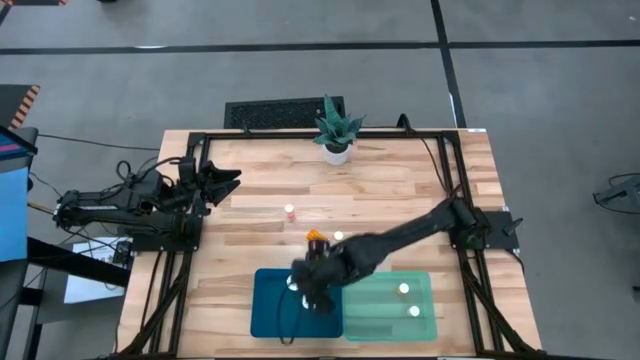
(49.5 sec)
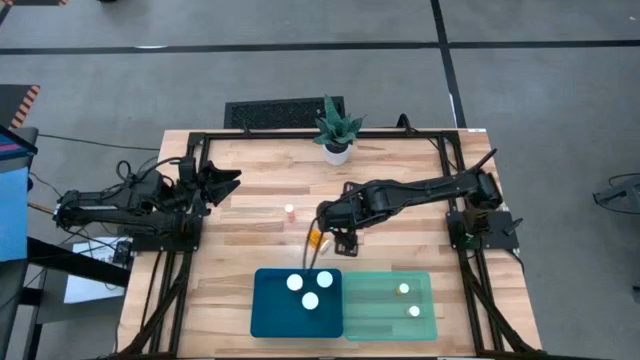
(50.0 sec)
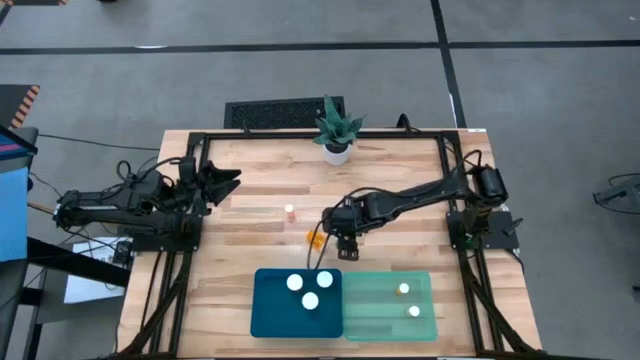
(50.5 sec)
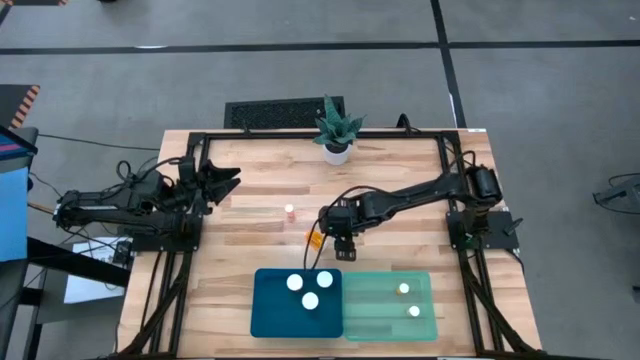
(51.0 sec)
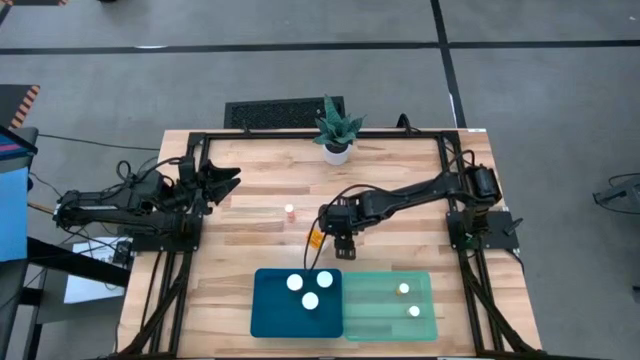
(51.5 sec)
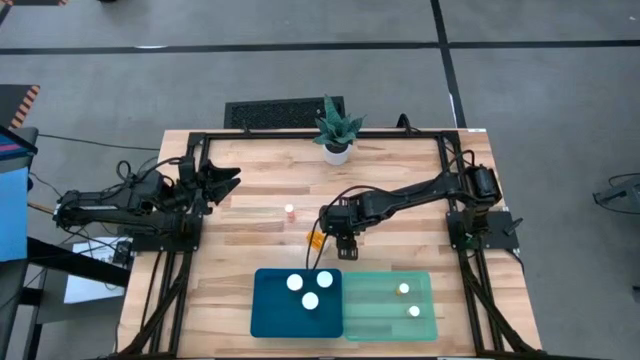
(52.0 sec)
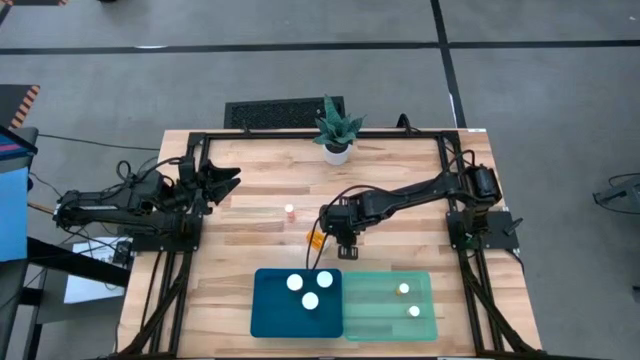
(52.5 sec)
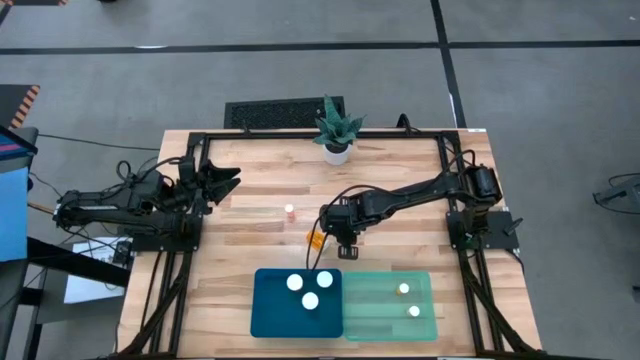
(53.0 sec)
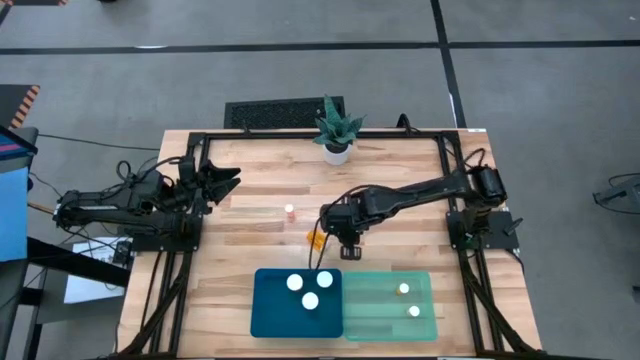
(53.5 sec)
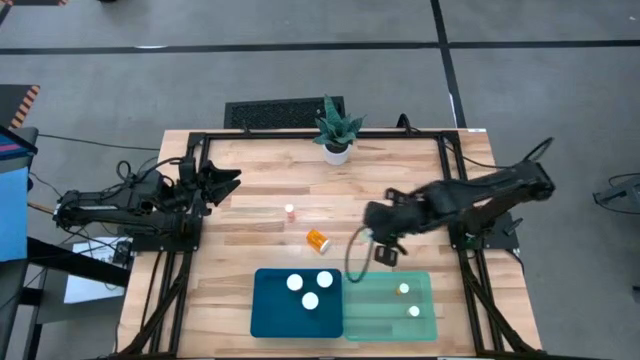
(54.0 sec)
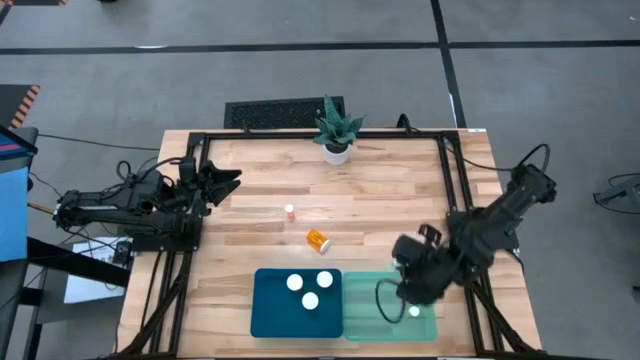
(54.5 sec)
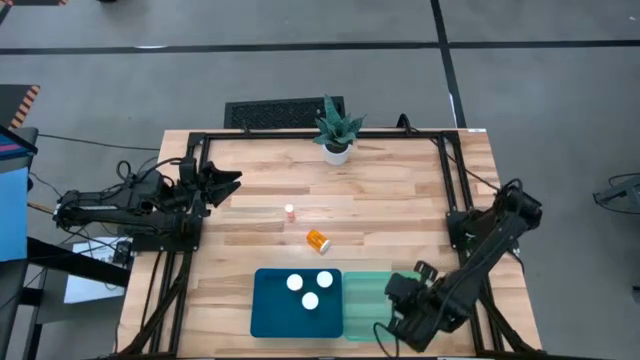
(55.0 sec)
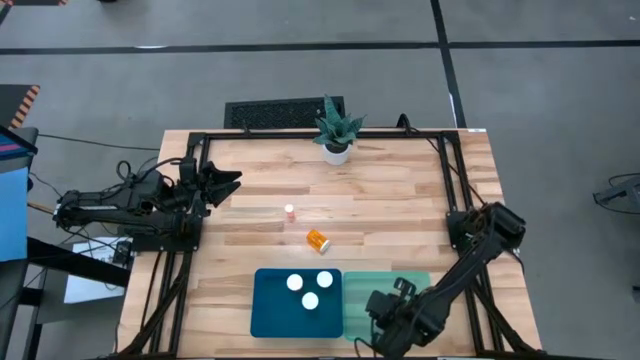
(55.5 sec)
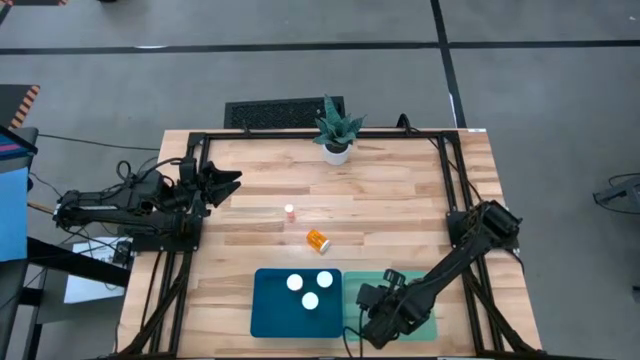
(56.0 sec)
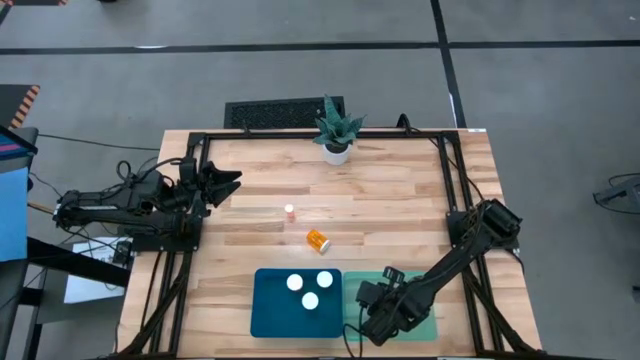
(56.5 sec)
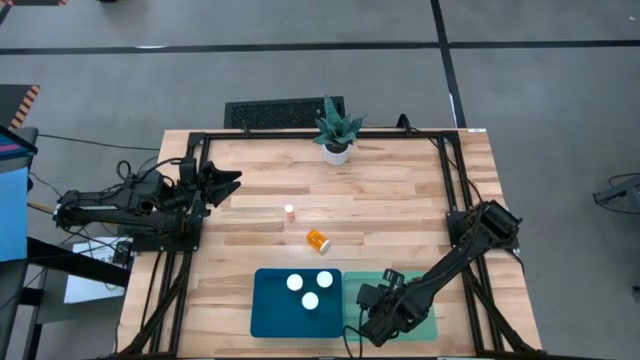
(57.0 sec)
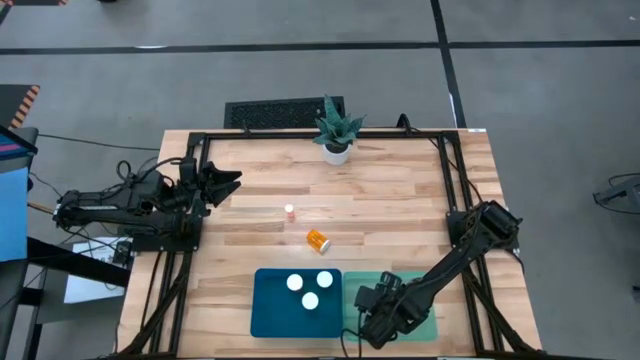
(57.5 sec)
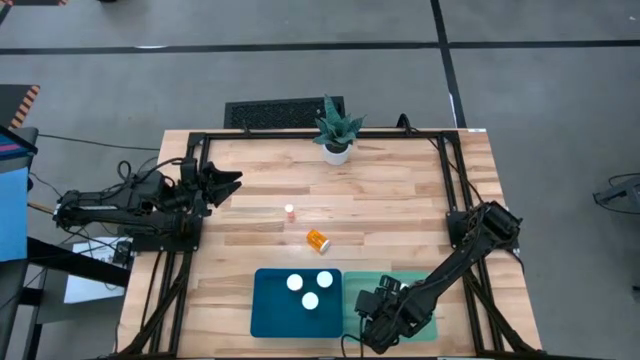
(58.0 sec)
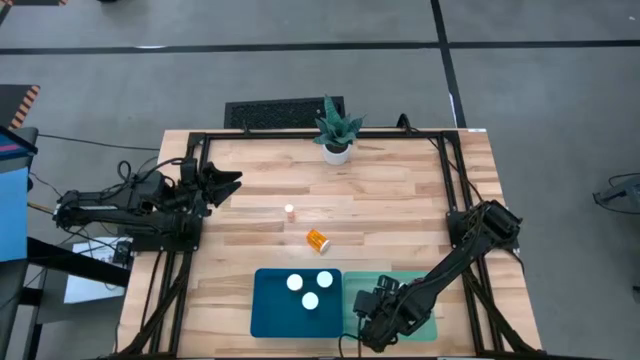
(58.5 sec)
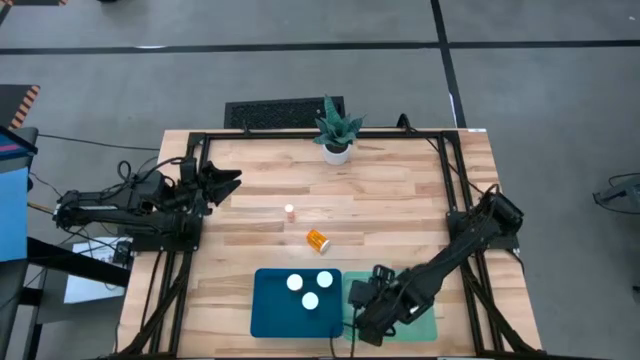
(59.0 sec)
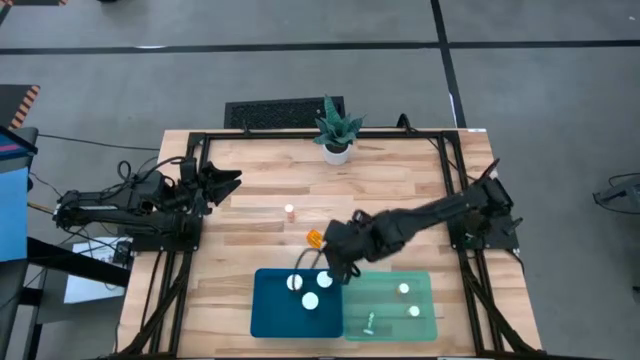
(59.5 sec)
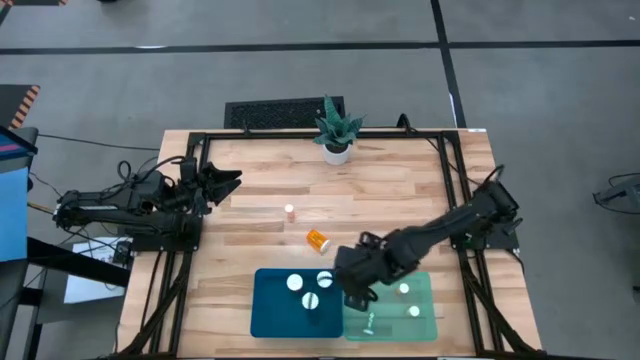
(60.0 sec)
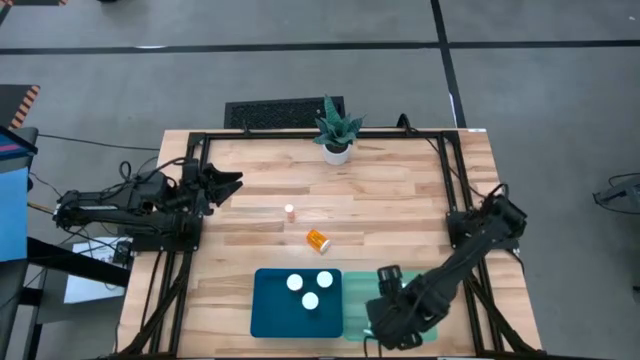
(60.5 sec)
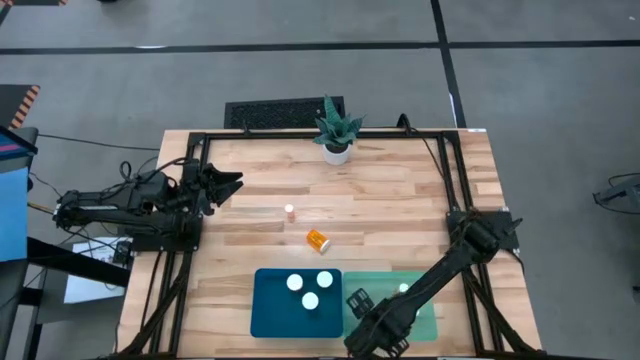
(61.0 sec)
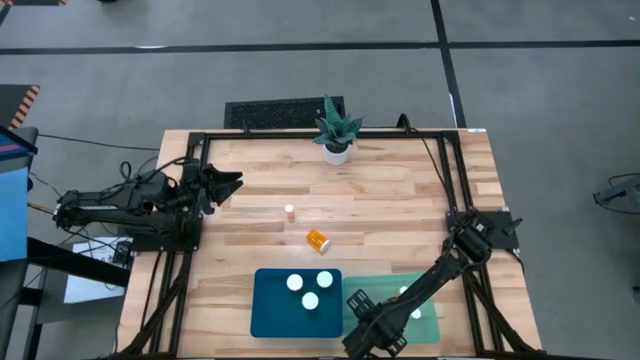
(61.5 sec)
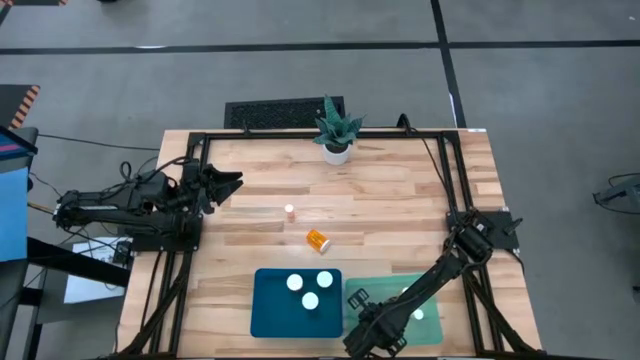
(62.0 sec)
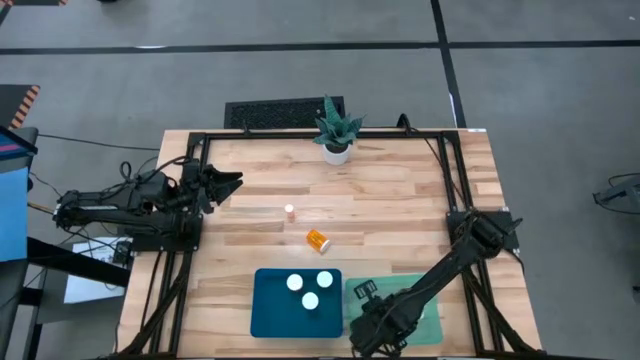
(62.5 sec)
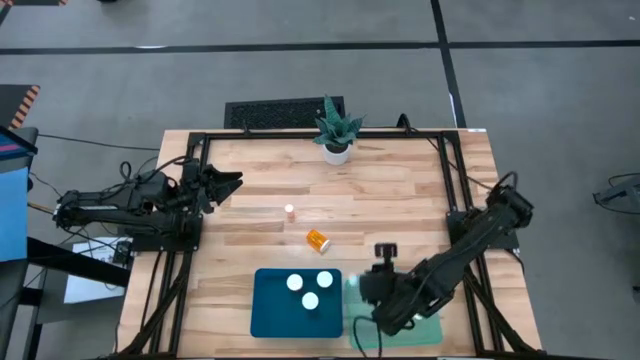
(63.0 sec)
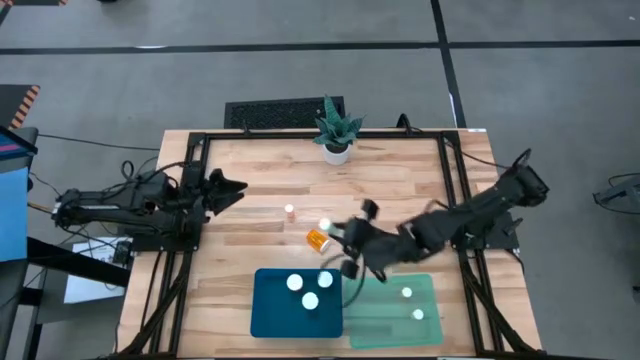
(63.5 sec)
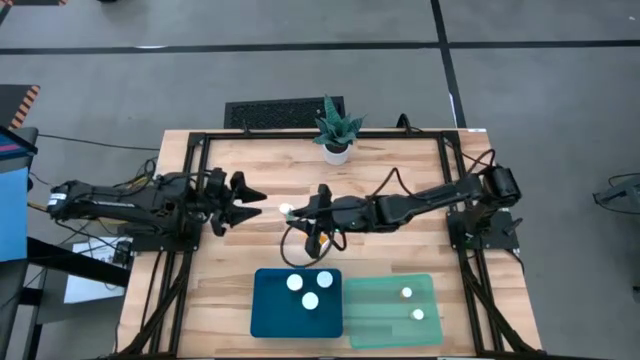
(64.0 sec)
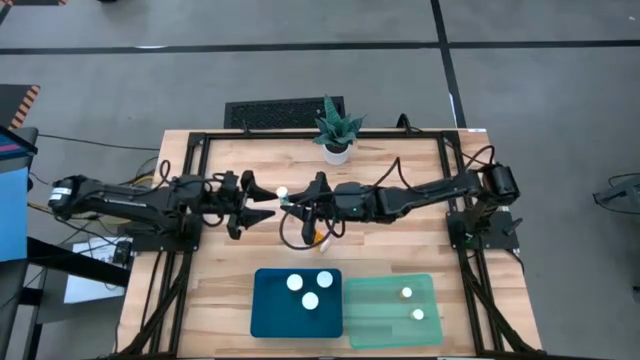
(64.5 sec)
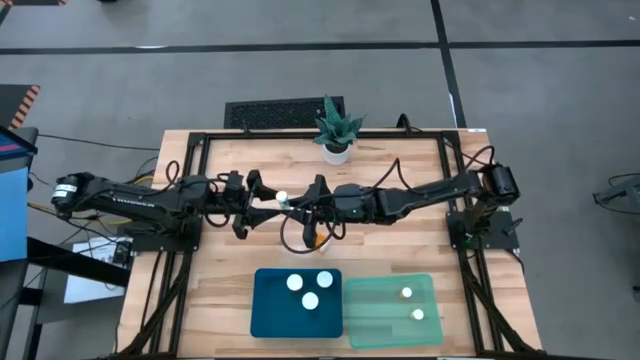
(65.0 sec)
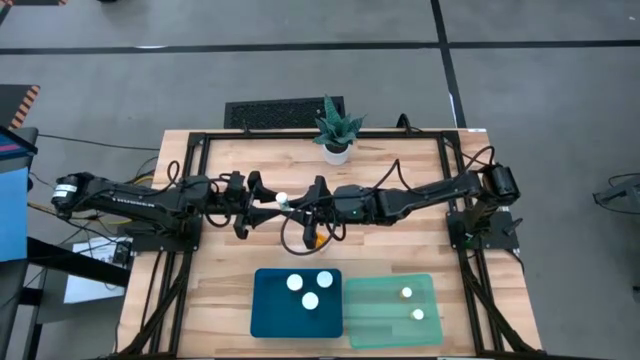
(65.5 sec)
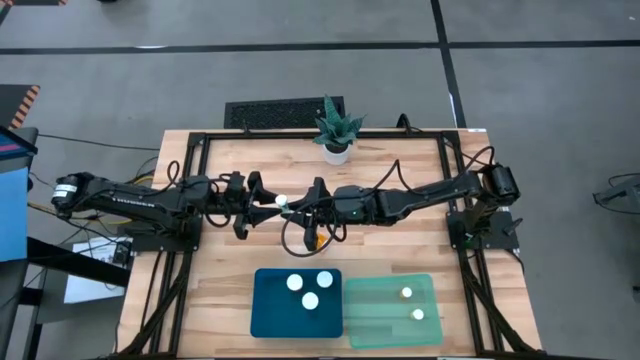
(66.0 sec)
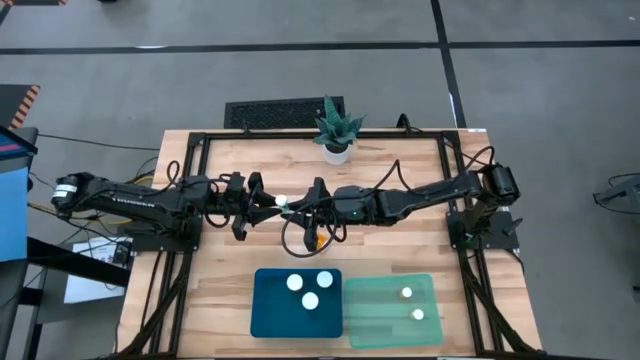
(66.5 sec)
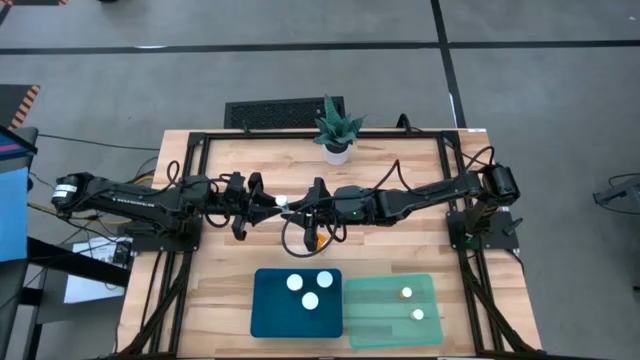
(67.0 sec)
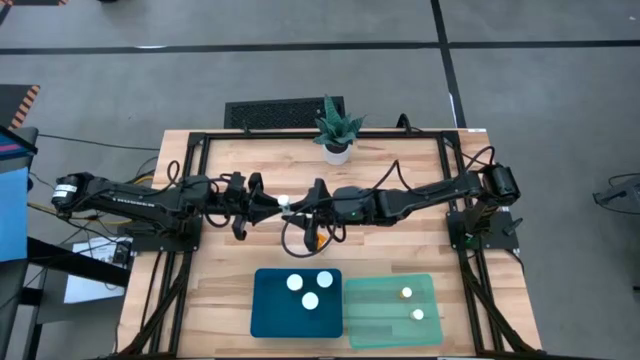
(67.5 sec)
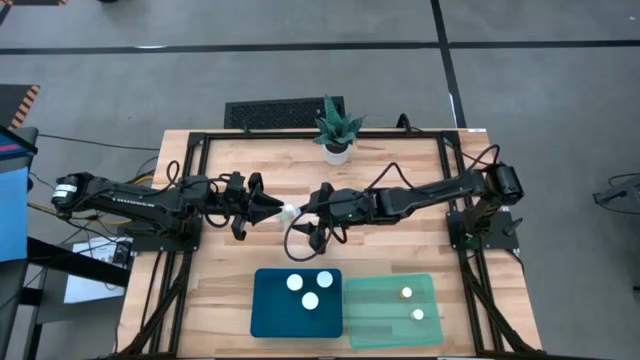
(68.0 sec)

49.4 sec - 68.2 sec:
Task: Pick and place medicine bottles into bin by pill shape (circle, oval)
Put the small blue pill bottle into the light blue bin

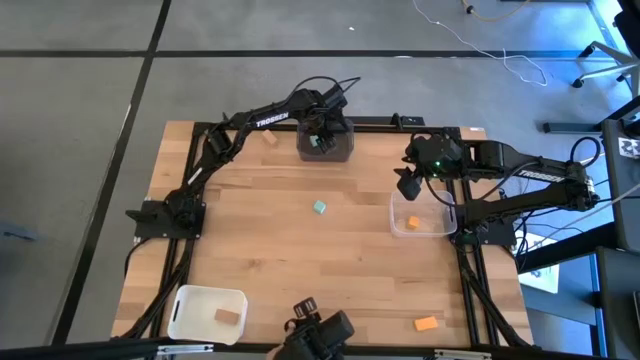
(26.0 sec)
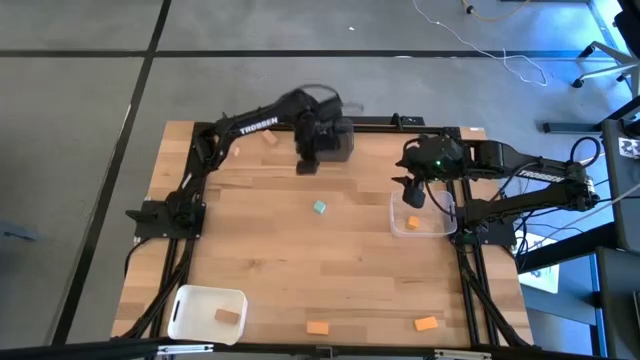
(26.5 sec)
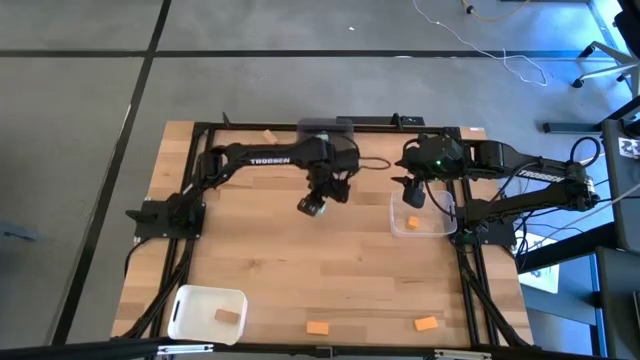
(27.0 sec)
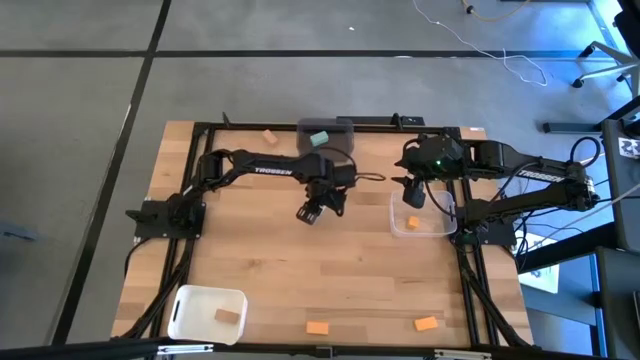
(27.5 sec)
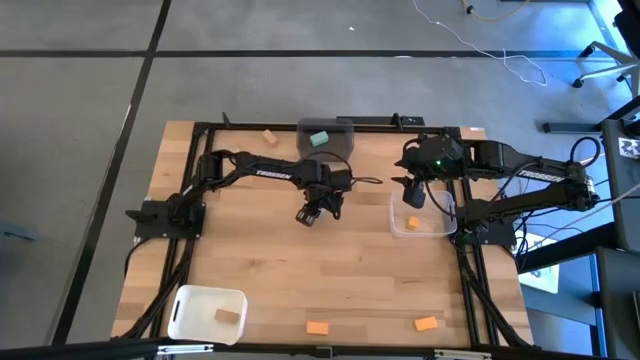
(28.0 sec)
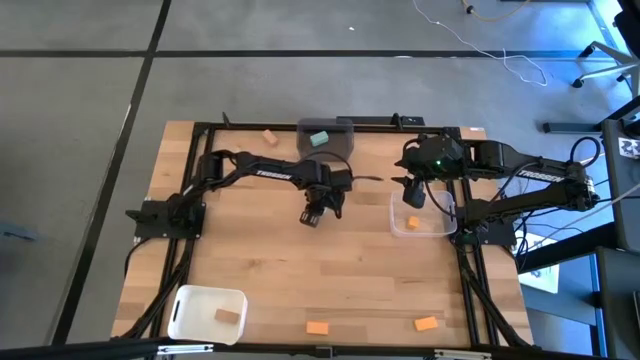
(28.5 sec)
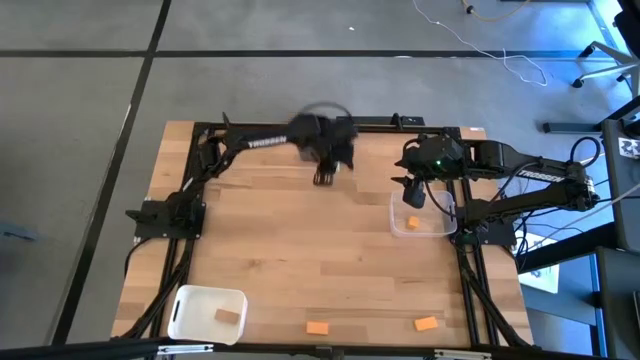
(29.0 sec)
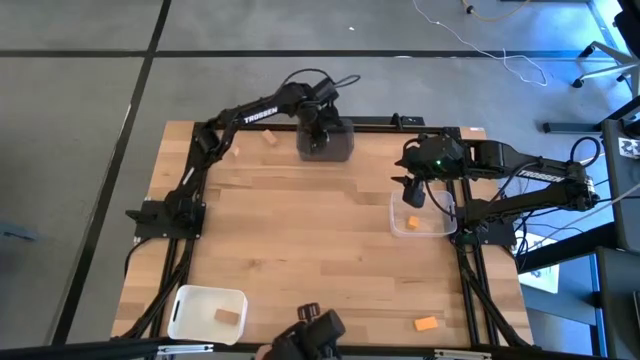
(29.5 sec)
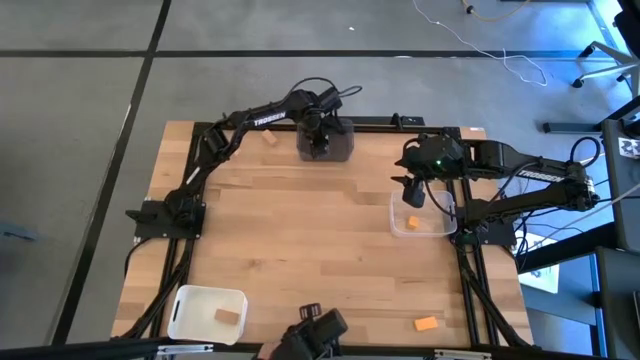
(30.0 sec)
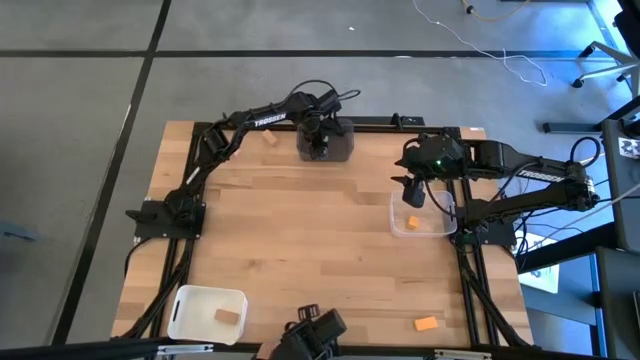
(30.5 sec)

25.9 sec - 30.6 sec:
Task: Sort & place blocks by color
Put the bottom blue block into the black bin
